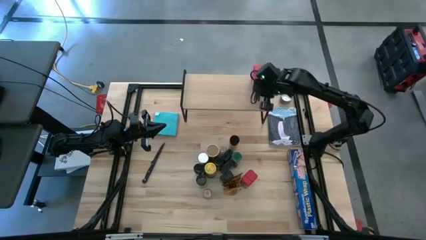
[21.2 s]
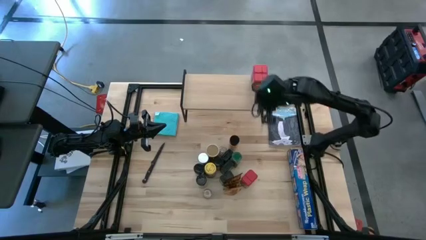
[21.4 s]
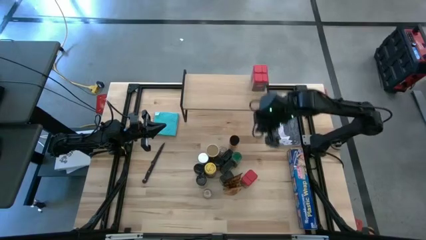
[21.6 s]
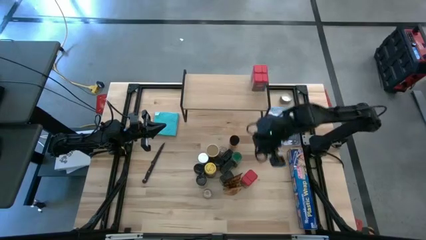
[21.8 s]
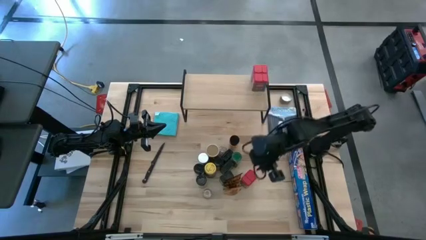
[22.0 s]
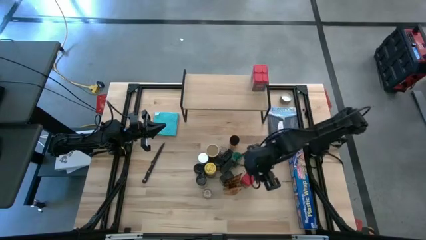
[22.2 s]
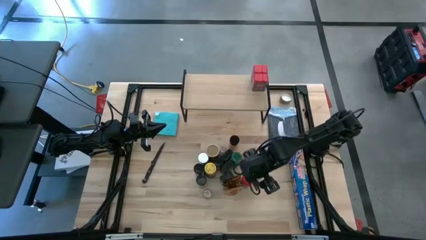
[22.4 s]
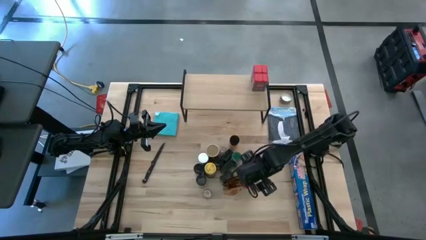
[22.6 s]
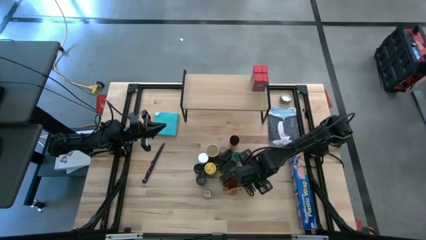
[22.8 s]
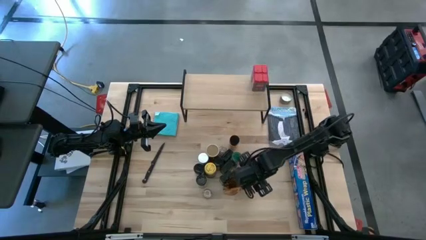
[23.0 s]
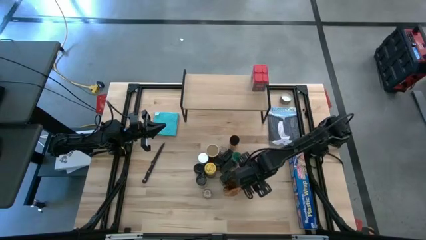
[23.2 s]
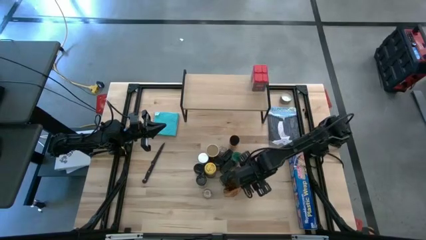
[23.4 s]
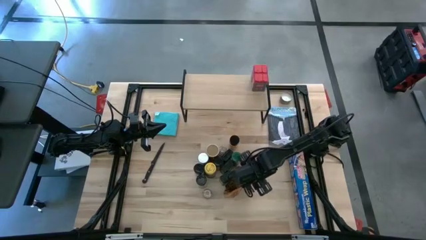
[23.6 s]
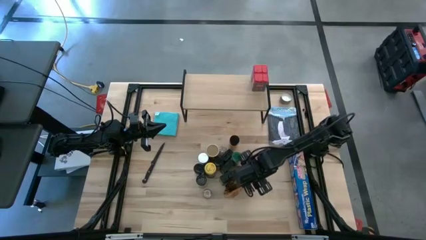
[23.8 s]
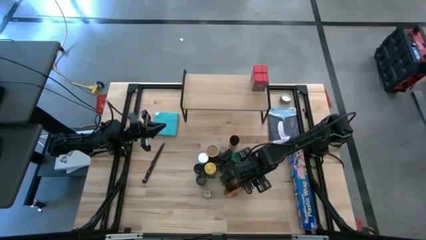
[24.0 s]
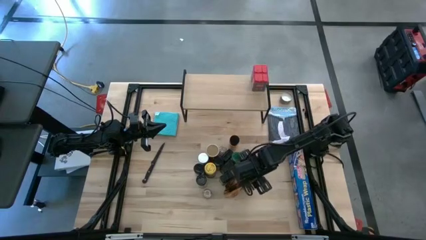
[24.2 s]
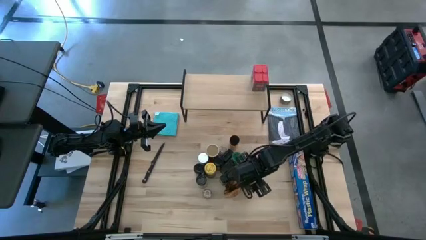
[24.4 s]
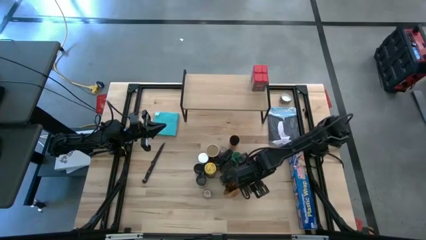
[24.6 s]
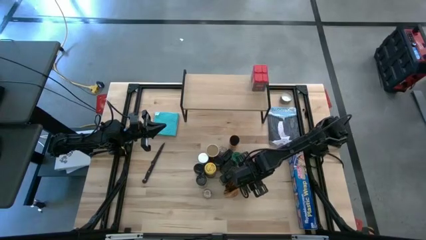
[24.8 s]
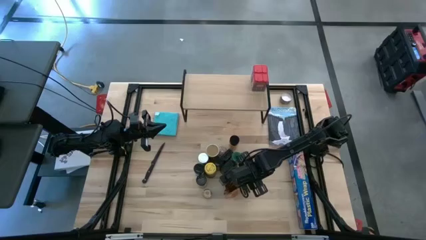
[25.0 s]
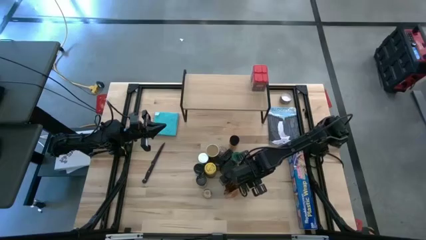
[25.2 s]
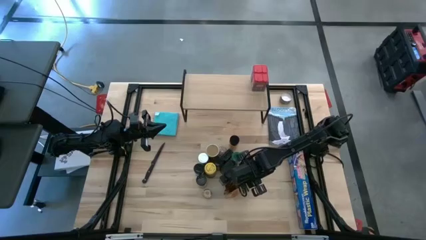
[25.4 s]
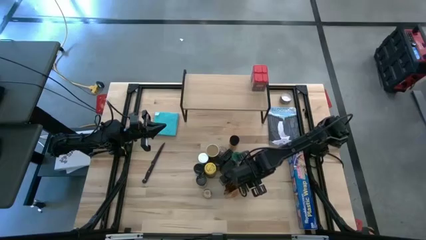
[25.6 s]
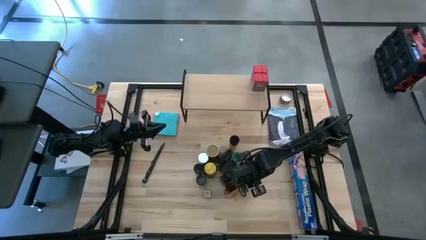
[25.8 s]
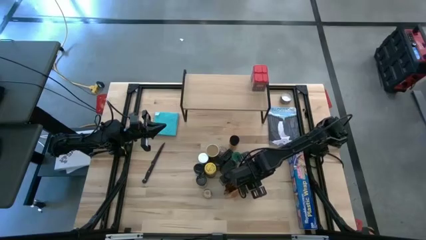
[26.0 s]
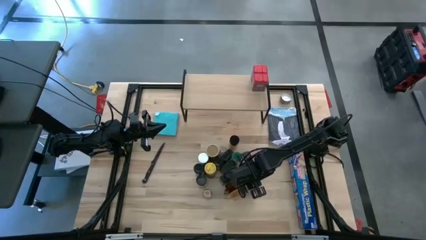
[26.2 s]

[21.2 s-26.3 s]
Task: Shelf spices
Put the red seasoning can on the shelf

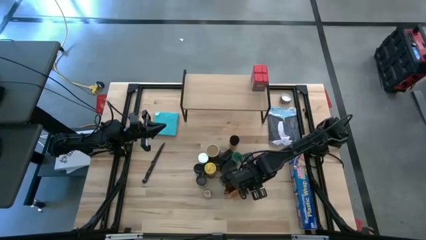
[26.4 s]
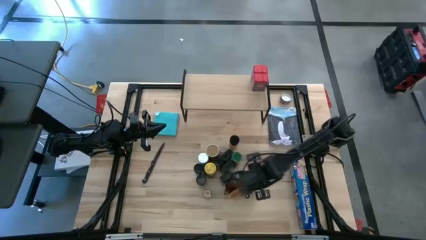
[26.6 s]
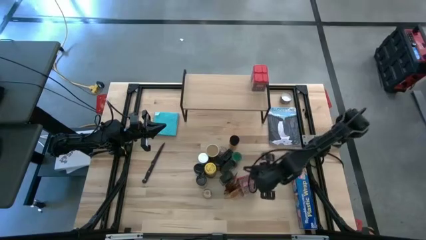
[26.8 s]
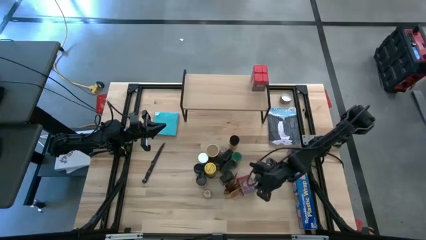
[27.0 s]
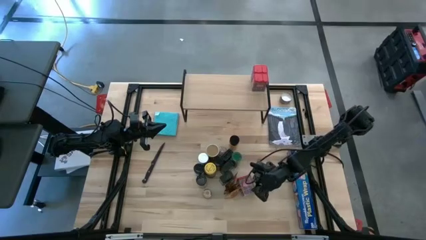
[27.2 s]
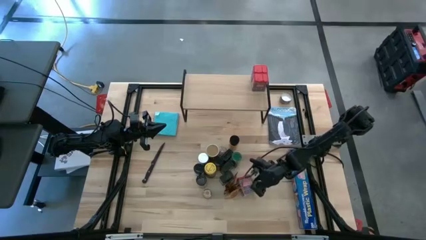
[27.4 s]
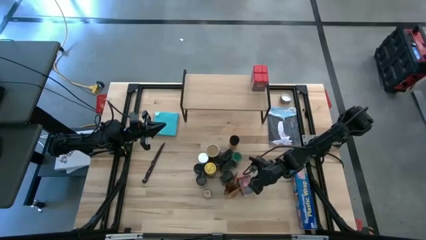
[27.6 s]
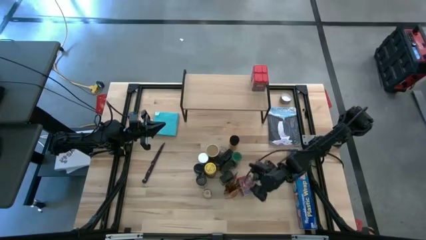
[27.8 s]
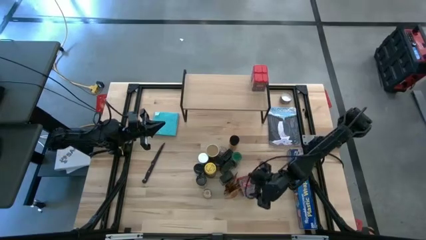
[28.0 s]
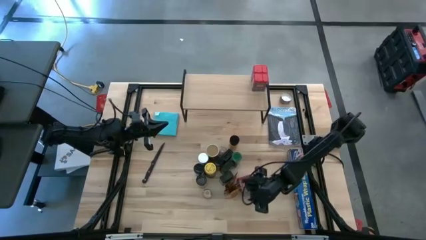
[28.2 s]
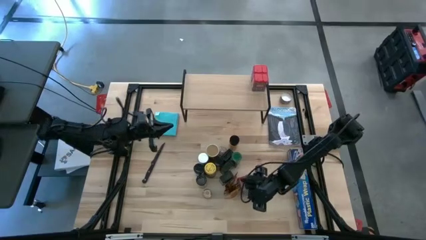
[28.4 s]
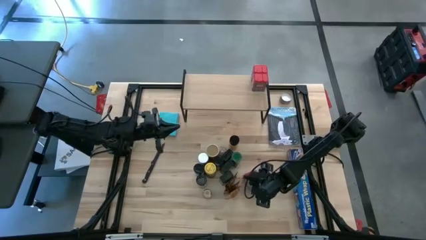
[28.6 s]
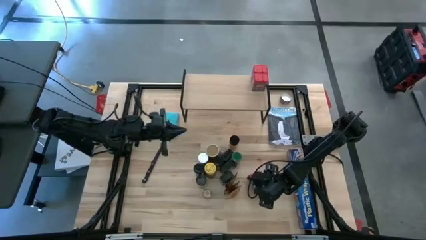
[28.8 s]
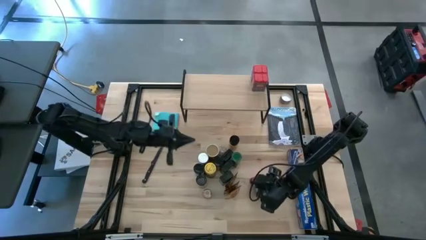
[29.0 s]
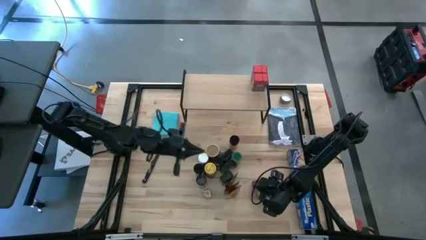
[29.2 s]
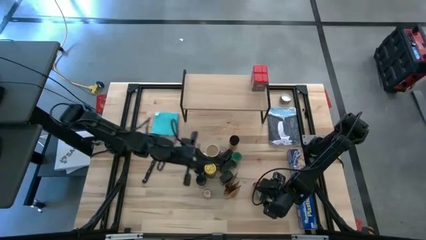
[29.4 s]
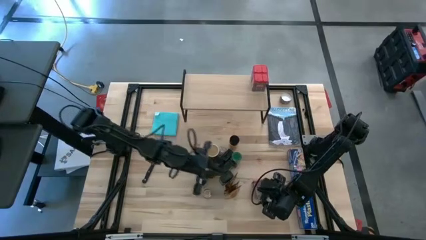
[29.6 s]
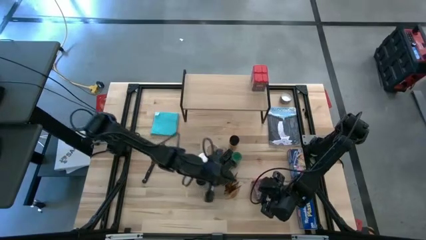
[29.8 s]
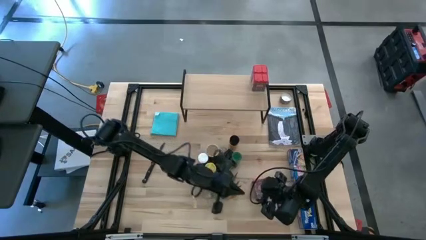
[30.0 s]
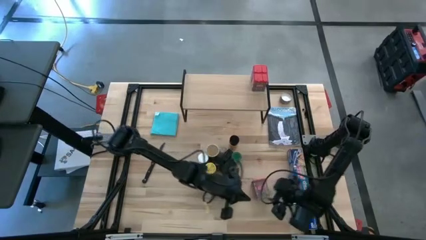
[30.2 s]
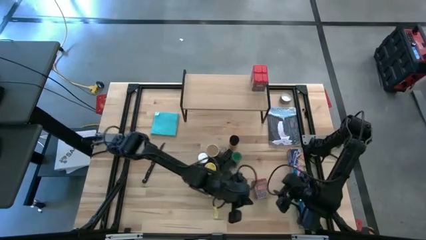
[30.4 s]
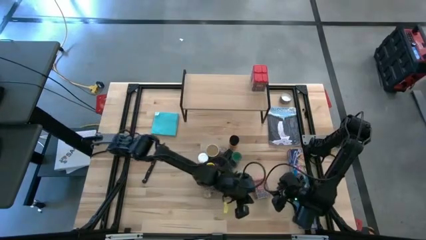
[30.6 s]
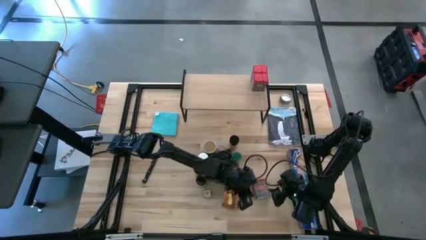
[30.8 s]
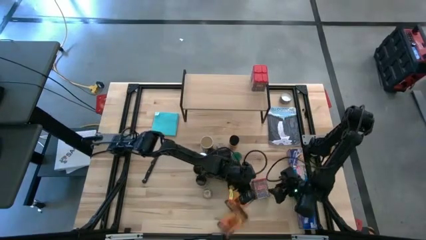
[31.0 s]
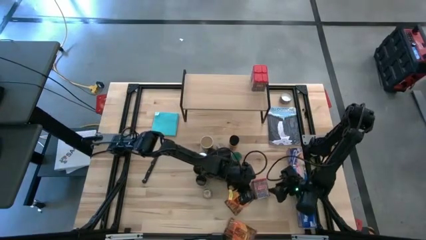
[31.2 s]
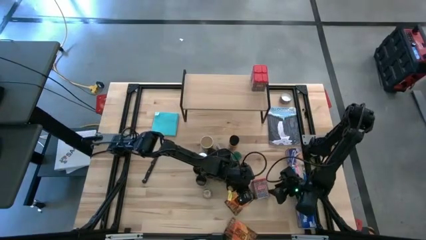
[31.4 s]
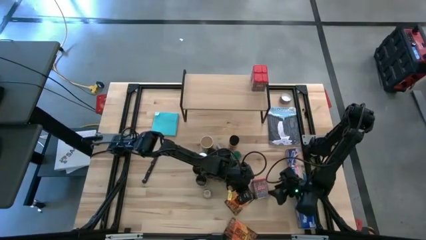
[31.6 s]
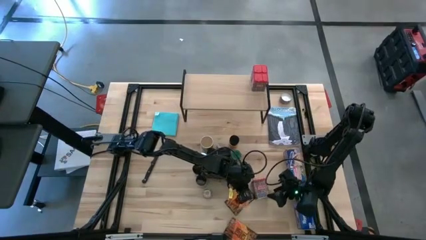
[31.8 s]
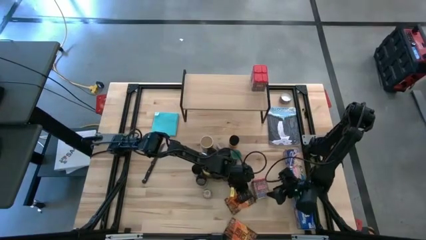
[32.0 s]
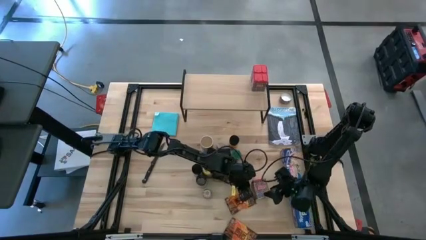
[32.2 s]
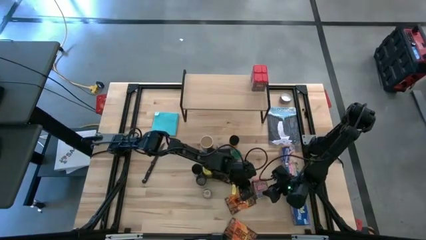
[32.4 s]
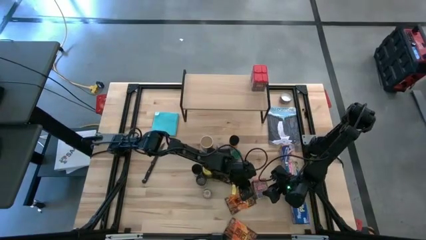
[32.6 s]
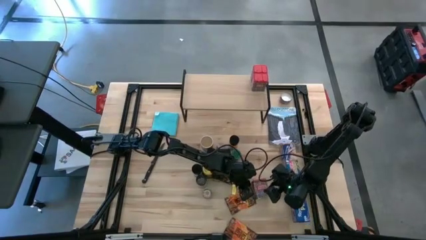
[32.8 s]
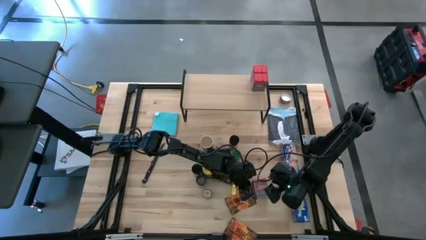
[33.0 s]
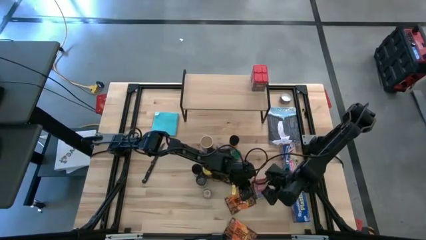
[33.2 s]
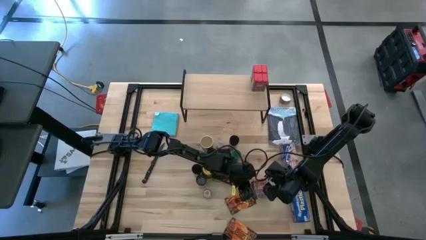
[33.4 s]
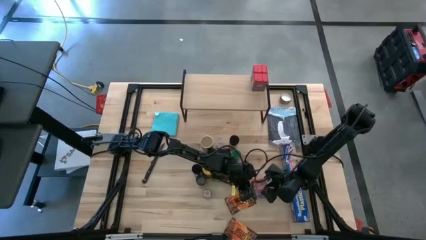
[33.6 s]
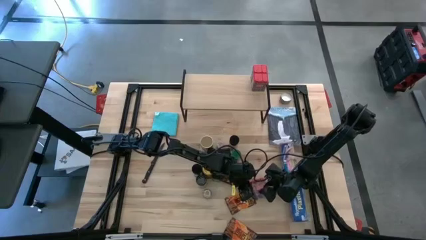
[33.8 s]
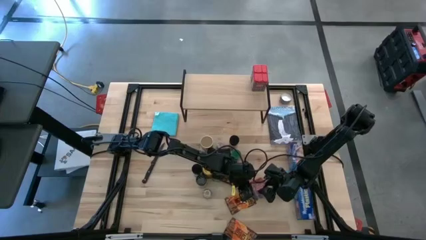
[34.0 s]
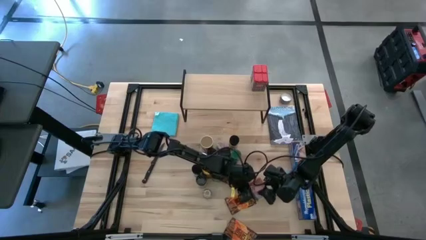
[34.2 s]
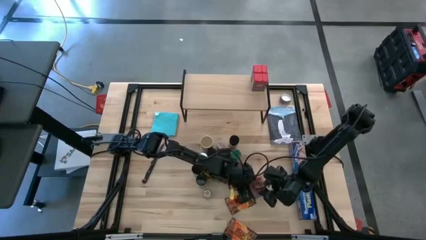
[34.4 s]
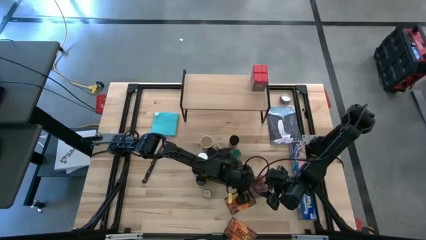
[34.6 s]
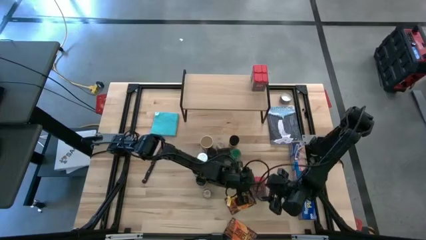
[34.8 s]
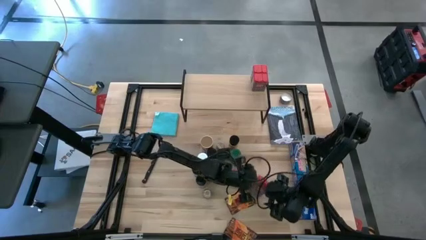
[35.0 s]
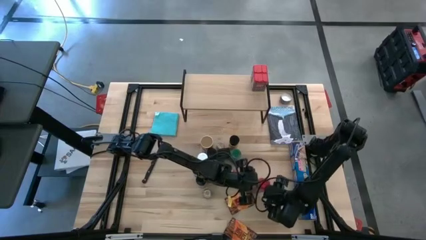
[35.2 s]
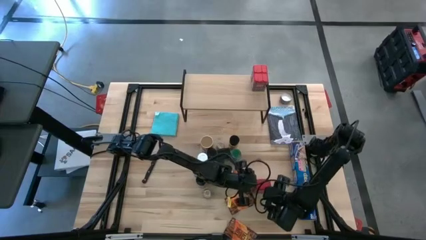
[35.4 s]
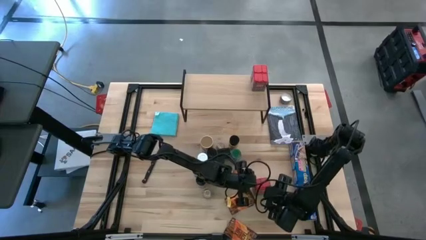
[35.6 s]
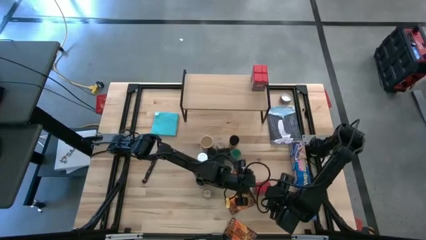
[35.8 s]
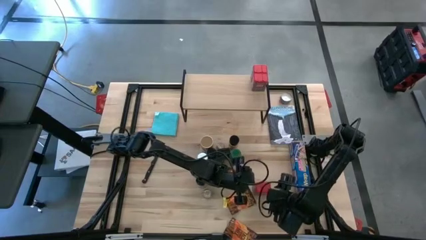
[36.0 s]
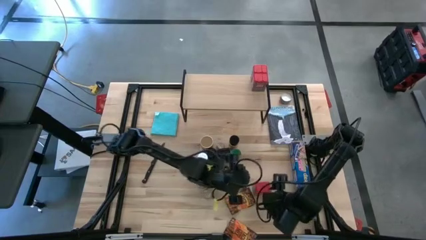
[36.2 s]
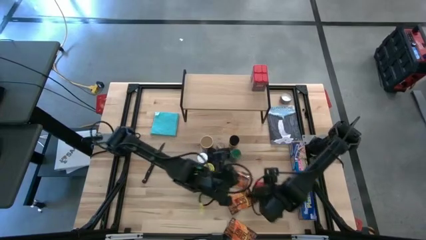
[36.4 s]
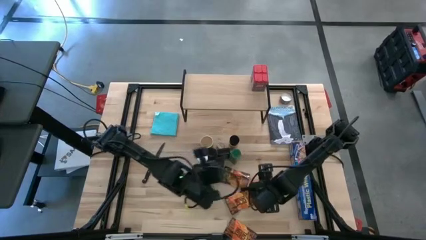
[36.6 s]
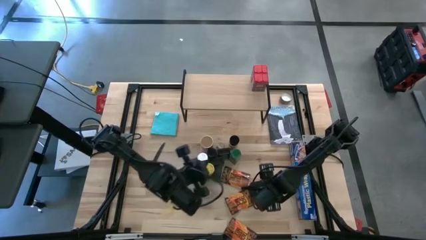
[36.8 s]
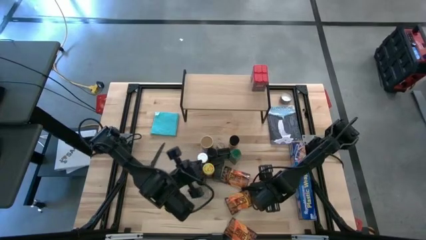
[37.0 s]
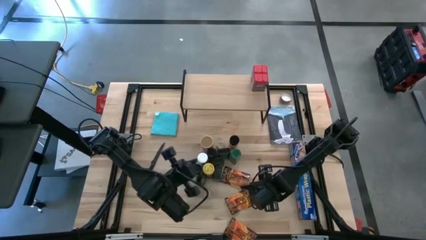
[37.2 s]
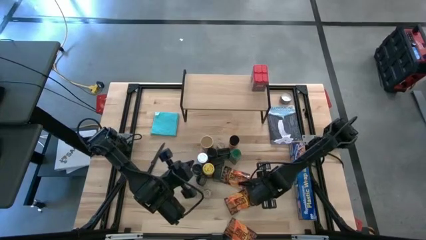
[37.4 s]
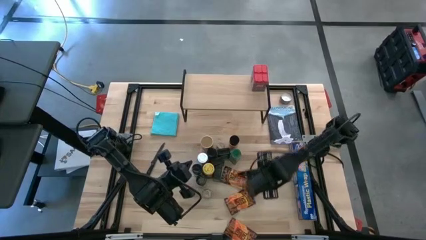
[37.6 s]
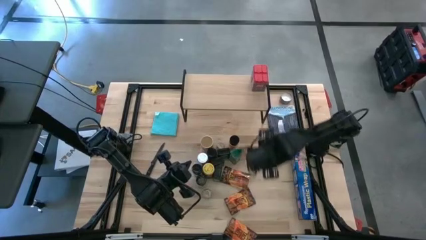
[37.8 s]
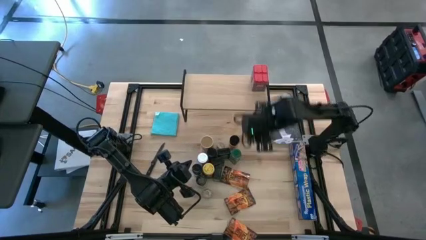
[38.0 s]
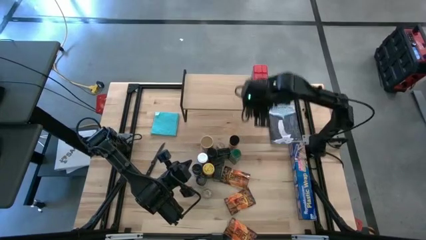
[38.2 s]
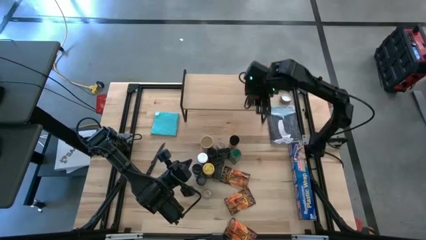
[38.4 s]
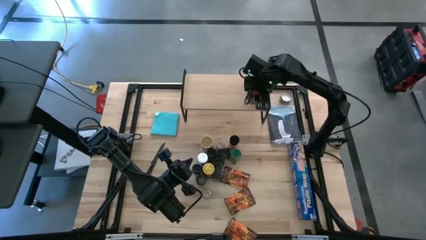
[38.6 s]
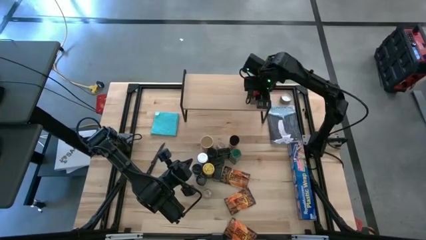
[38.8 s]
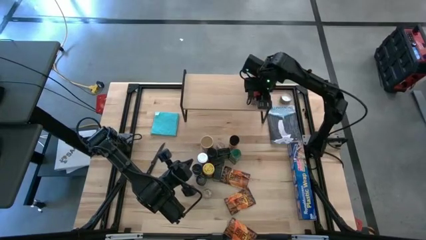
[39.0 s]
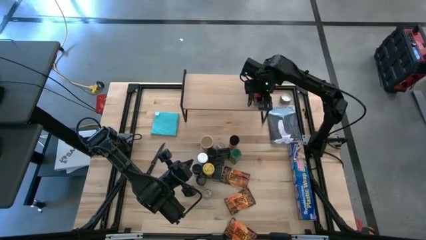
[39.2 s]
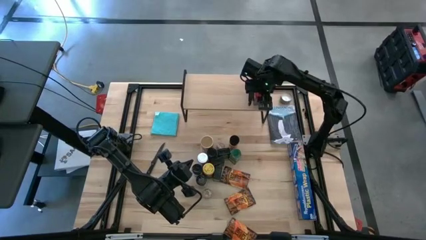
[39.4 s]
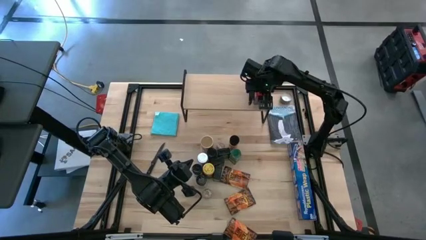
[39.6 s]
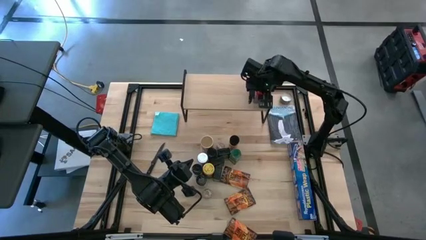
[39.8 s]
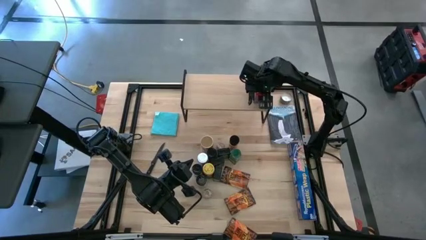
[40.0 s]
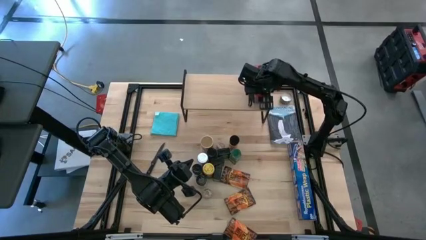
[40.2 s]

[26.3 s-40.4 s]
Put the red seasoning can on the shelf
